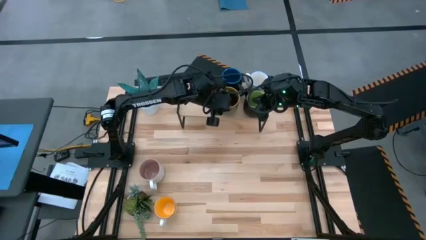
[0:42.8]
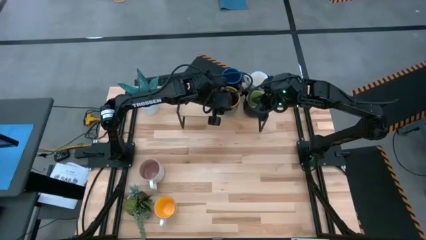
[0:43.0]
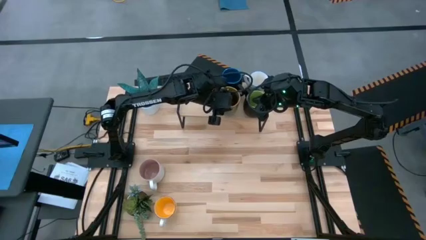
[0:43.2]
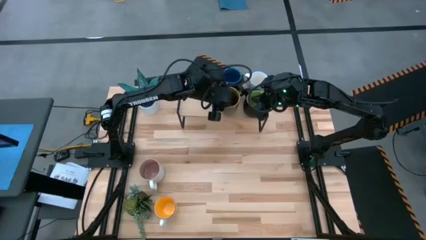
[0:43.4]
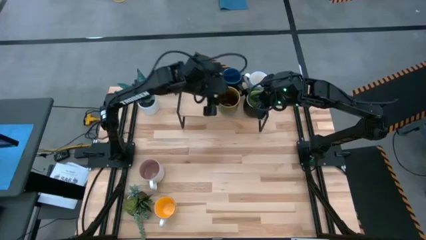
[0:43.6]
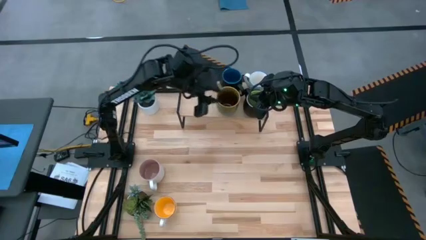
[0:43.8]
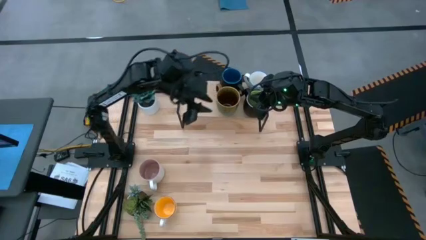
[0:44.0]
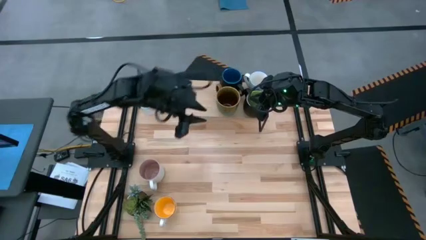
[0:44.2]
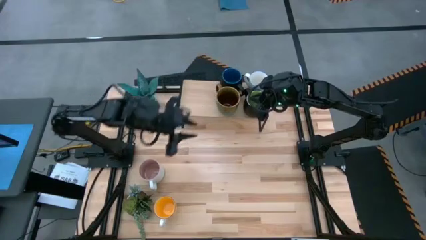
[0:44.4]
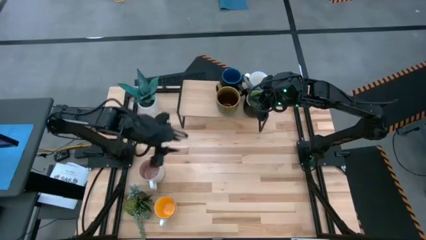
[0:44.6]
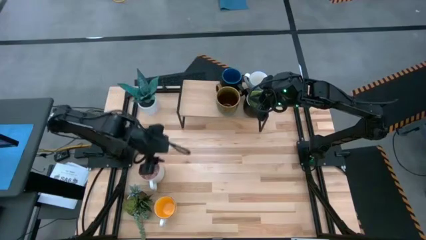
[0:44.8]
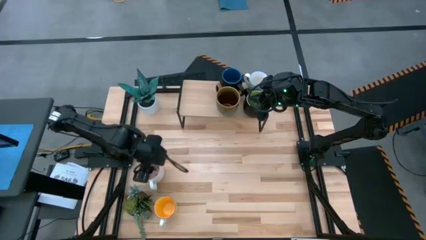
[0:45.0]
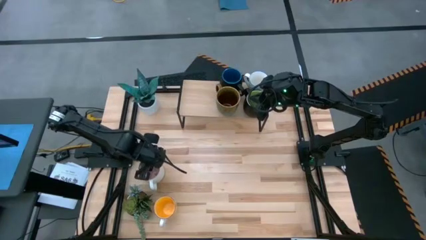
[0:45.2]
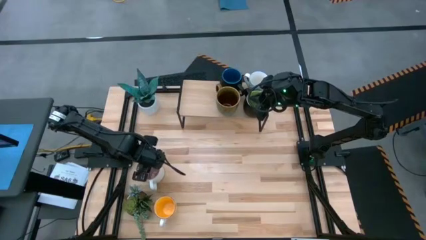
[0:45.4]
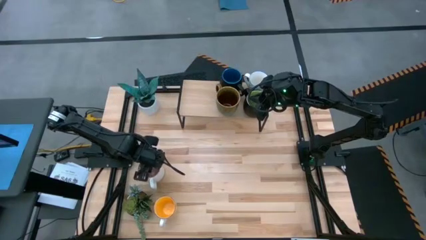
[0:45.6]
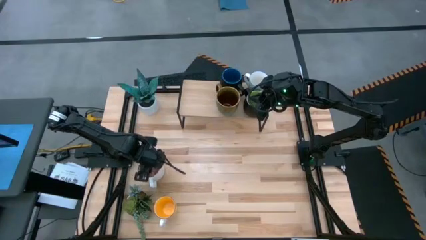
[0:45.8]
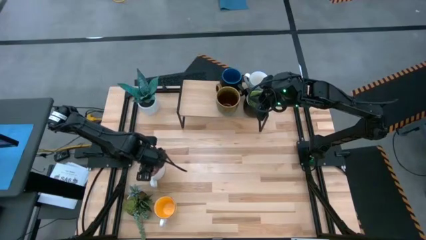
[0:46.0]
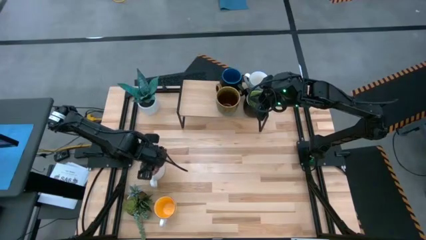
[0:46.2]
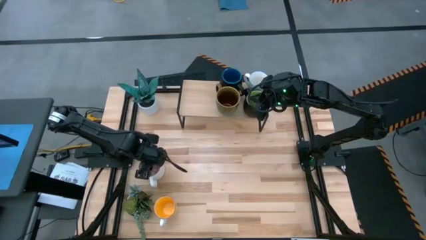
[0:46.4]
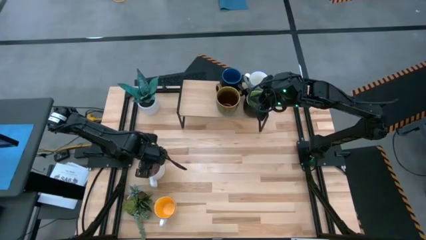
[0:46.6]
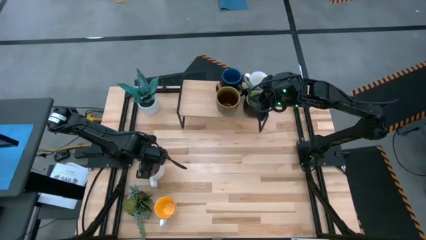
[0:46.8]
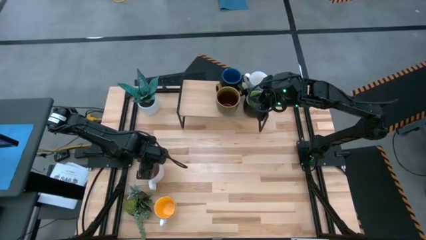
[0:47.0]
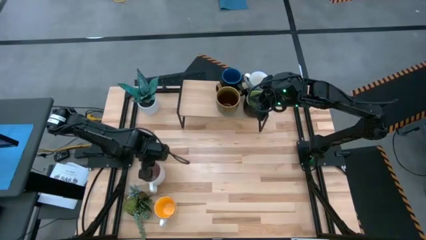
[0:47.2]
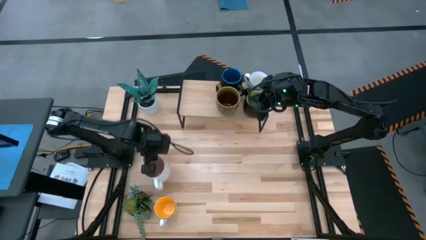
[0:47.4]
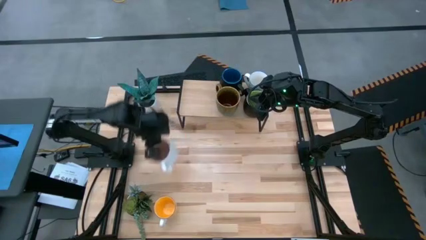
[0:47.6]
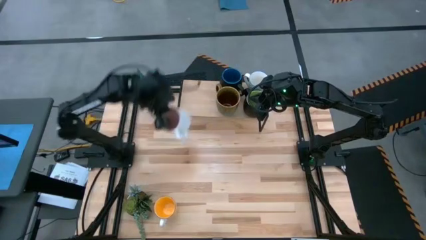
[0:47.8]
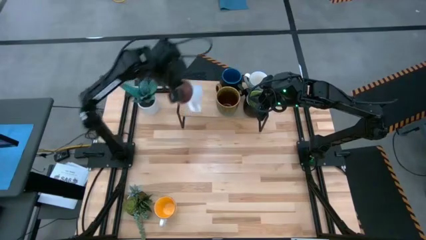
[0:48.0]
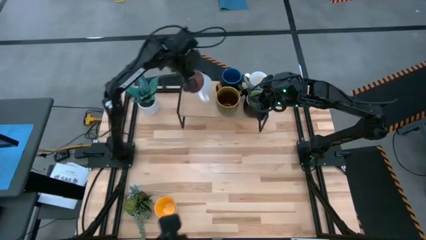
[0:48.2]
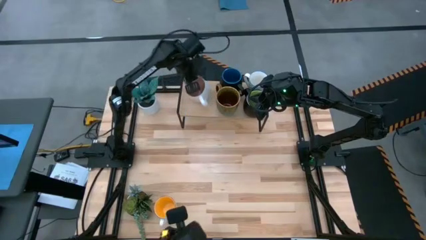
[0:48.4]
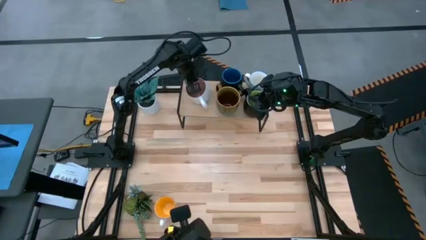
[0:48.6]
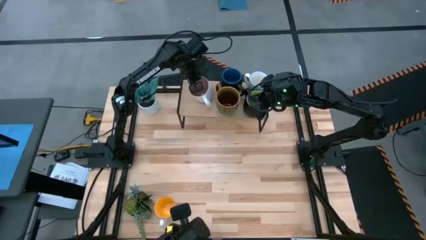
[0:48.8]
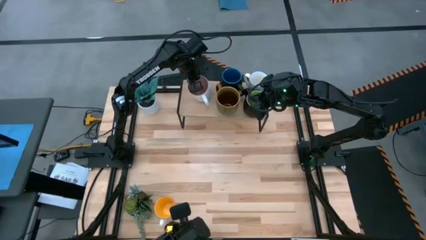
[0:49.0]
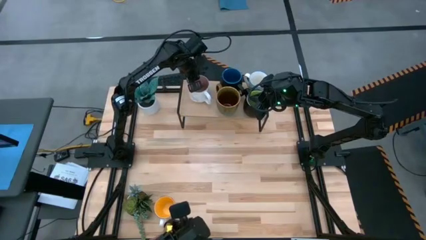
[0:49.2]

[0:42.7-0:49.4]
Task: Place coffee mugs
Put the white-pink interior mug on the shelf

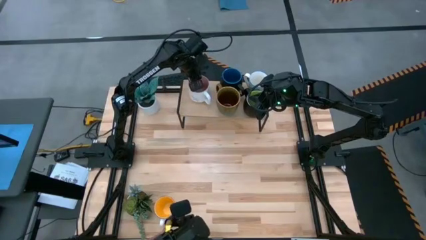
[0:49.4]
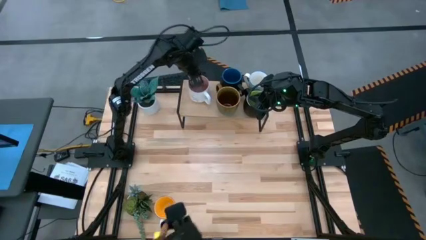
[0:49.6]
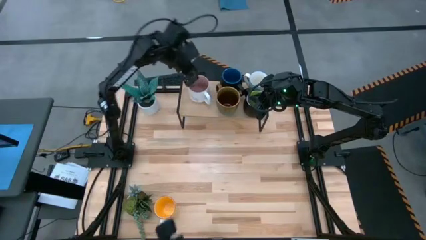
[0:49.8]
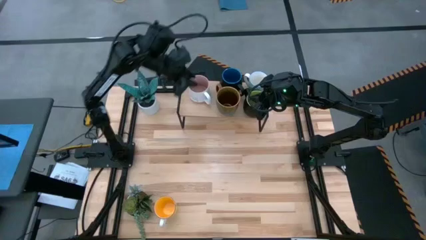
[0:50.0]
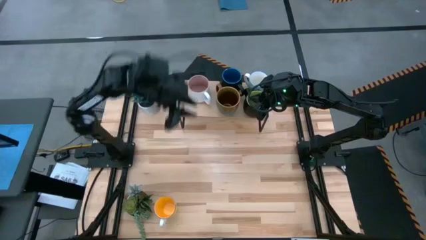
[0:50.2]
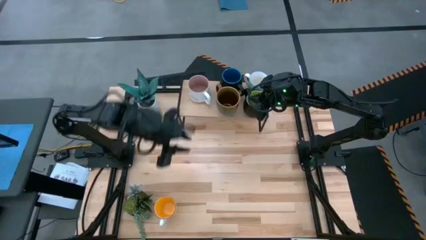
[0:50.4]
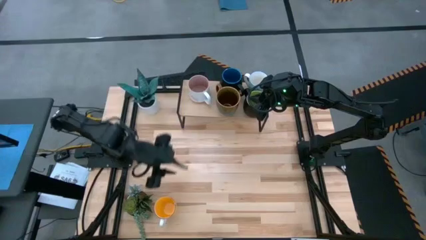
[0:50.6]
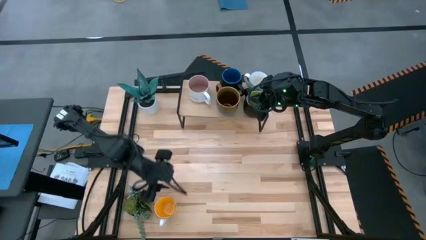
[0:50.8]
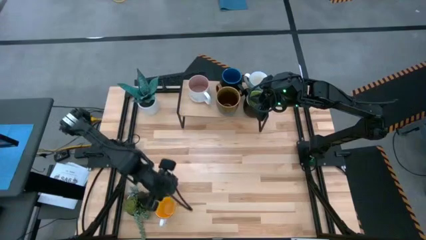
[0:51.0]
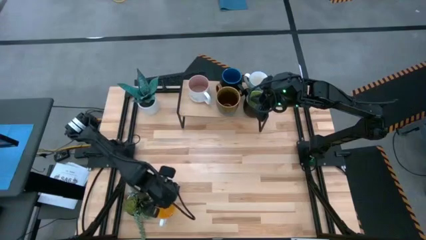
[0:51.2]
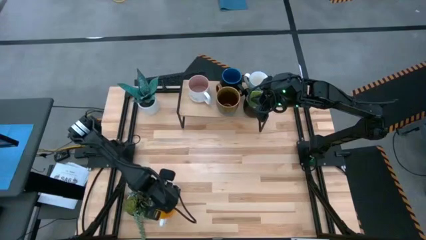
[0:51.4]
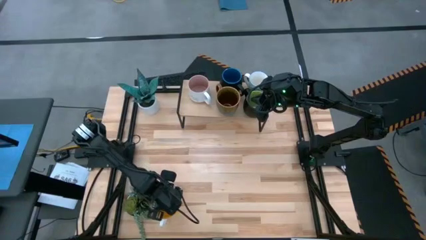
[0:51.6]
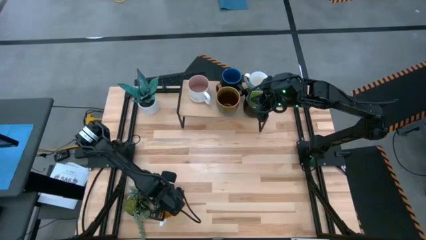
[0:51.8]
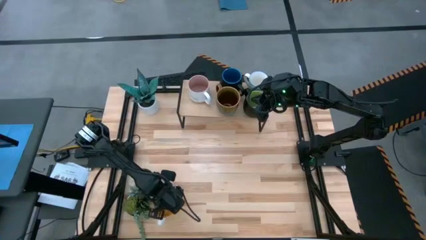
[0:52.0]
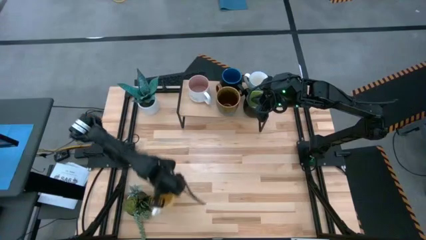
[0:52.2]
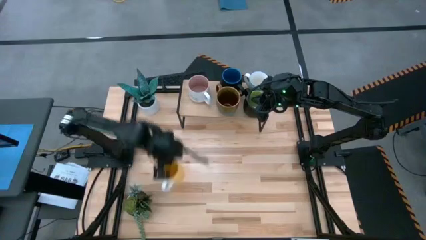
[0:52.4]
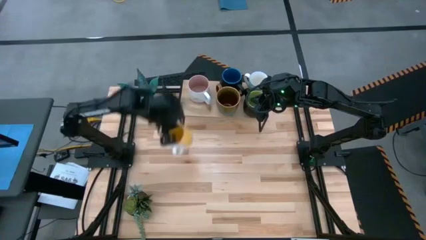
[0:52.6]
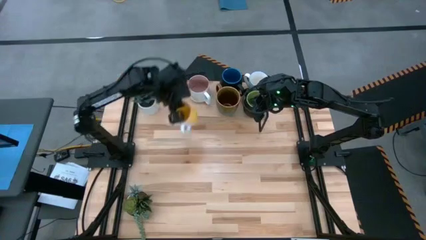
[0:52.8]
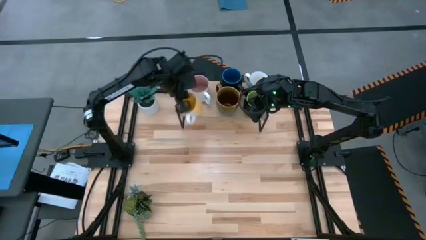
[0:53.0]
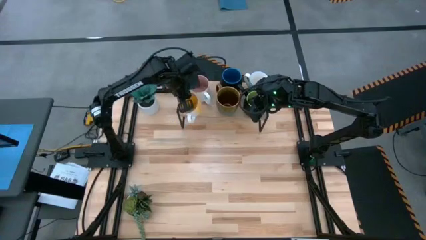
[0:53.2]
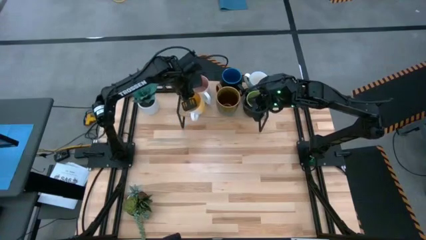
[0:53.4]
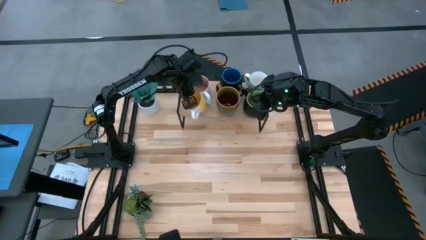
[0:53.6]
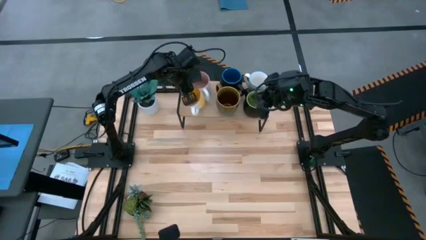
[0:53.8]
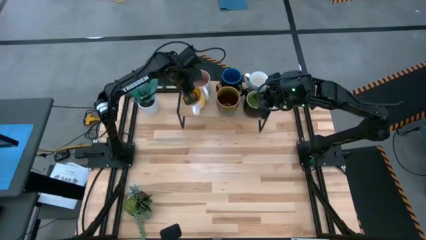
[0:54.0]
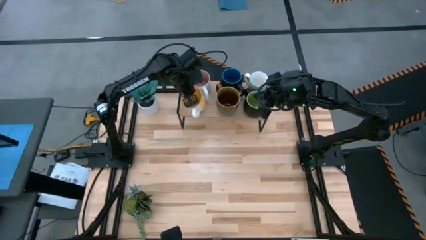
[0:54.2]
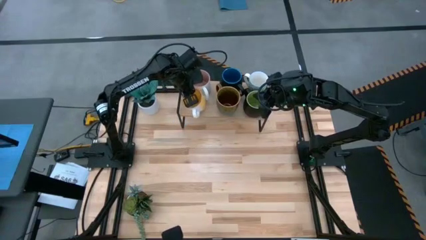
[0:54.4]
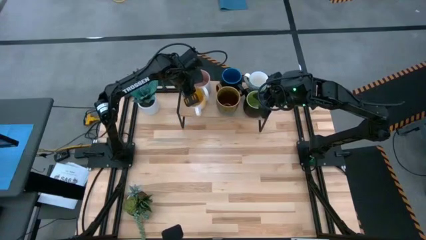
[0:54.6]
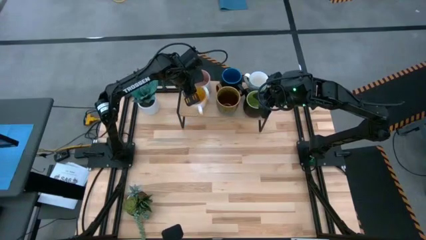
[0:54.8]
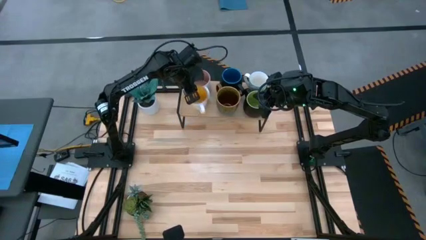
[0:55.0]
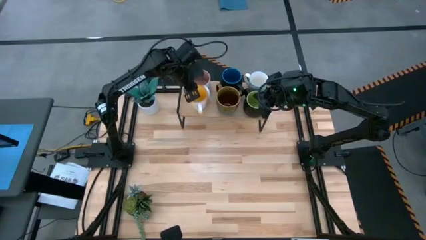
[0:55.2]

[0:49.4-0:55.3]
Put the yellow interior mug on the shelf

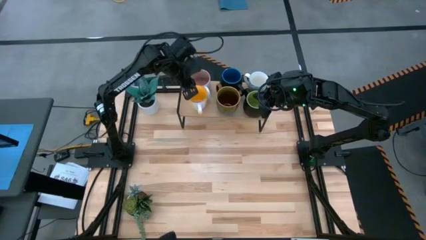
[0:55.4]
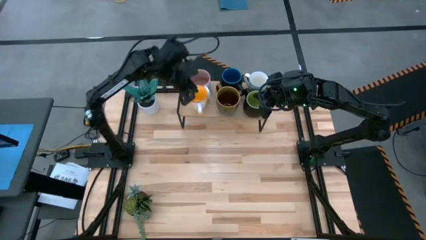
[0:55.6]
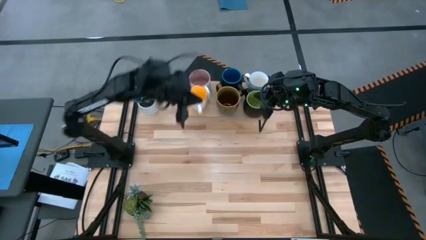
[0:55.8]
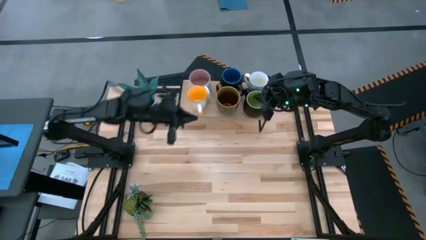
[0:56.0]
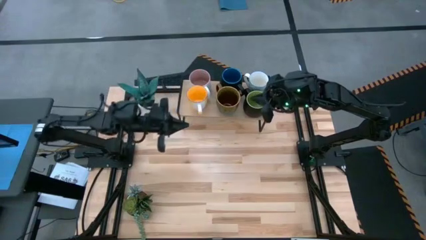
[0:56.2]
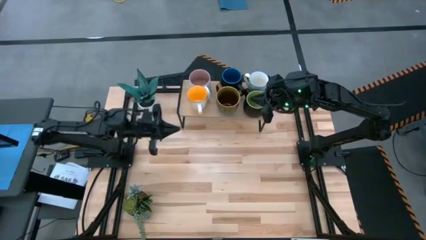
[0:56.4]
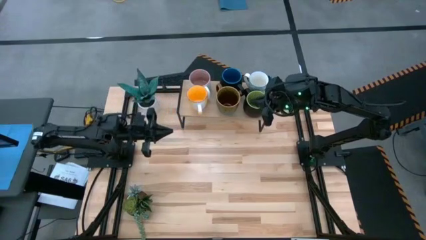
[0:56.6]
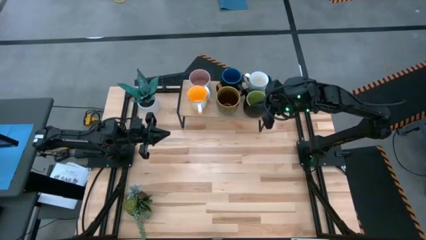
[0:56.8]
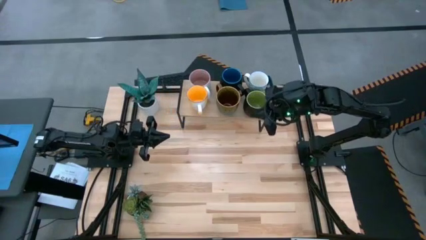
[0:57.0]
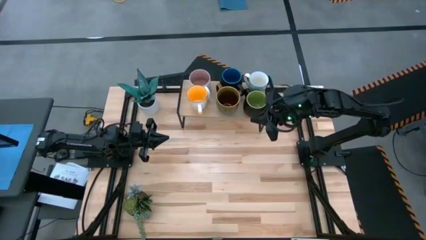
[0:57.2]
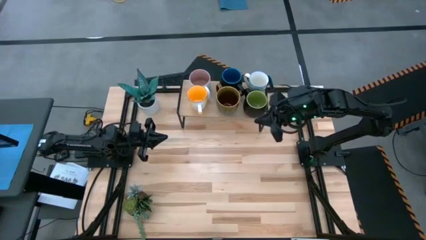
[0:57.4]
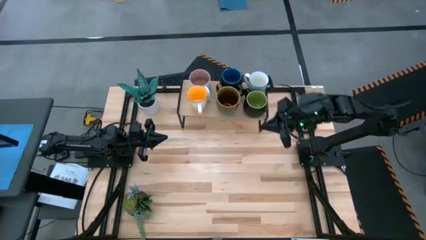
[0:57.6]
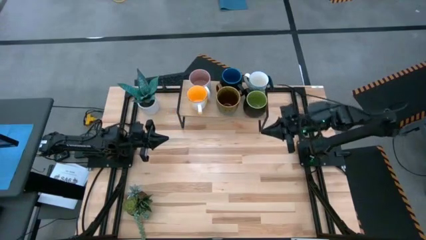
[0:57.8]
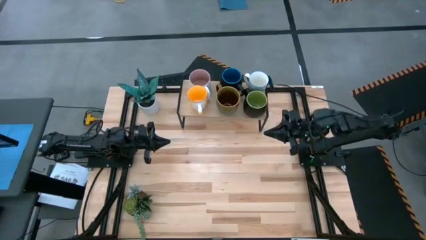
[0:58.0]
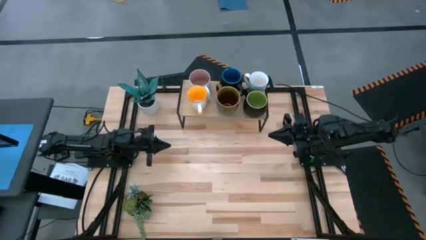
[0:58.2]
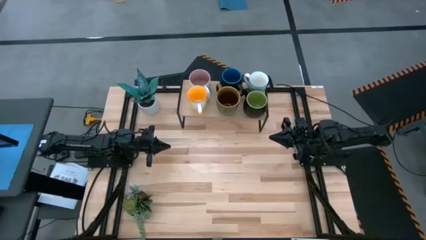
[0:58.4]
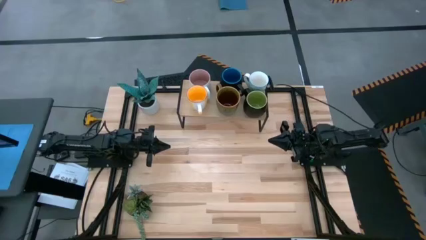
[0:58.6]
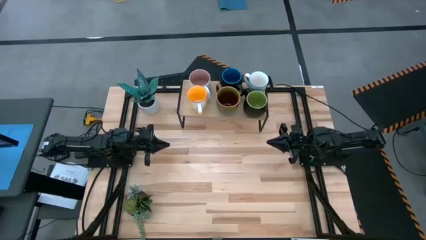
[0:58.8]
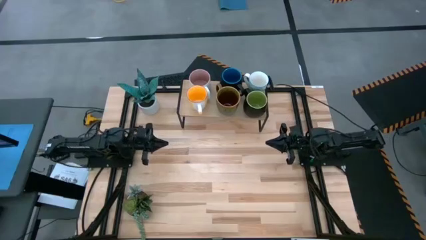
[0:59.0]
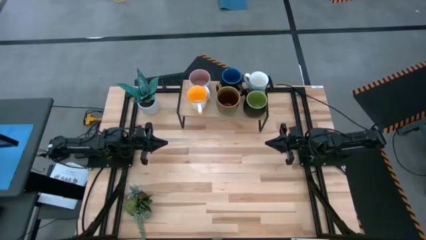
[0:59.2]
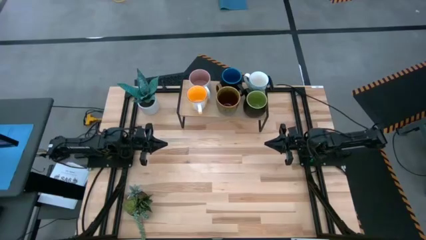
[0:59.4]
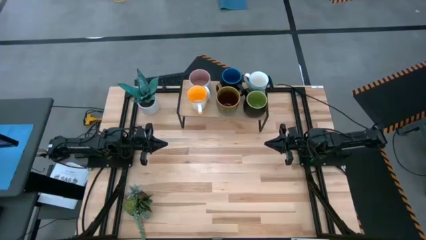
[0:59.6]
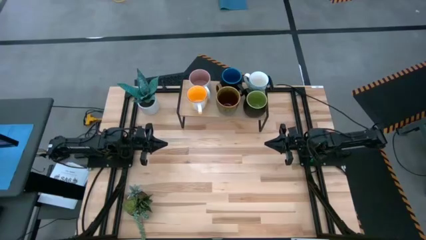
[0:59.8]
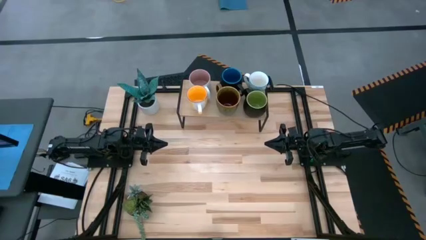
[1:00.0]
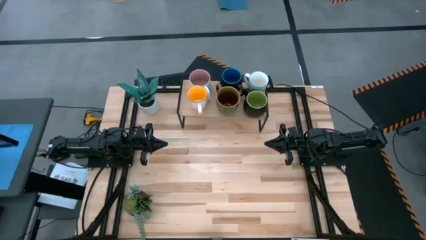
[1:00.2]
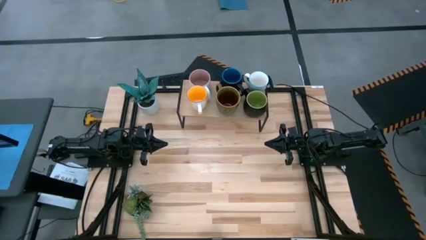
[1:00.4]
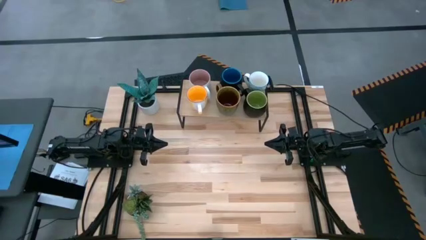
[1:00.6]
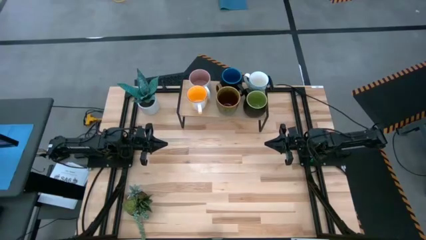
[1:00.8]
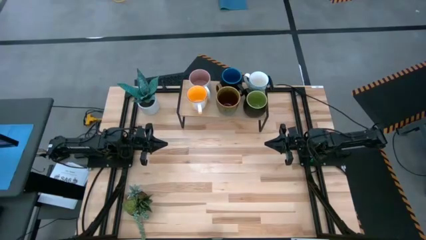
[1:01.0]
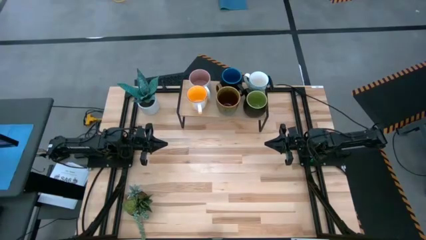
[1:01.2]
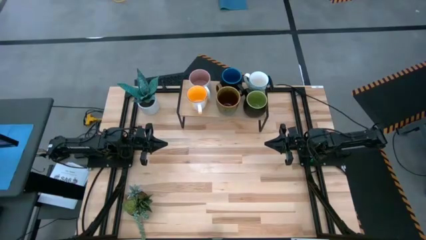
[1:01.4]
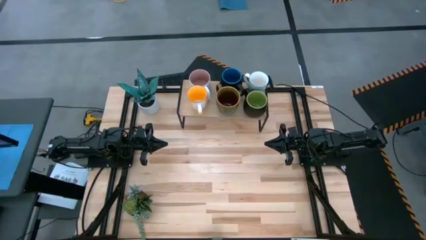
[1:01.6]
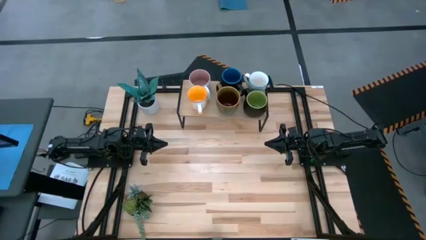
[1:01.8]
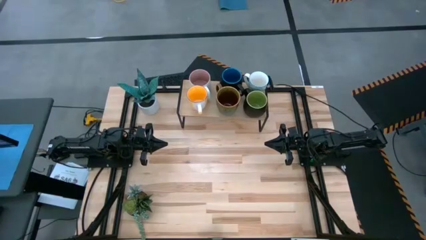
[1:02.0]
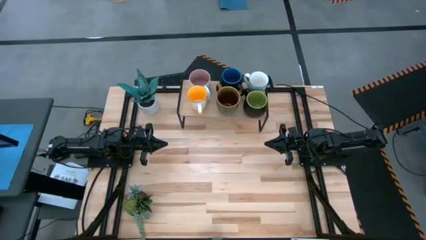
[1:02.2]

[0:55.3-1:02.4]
Return to Home Position
